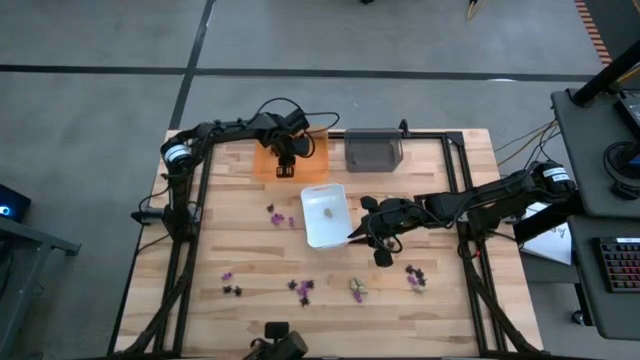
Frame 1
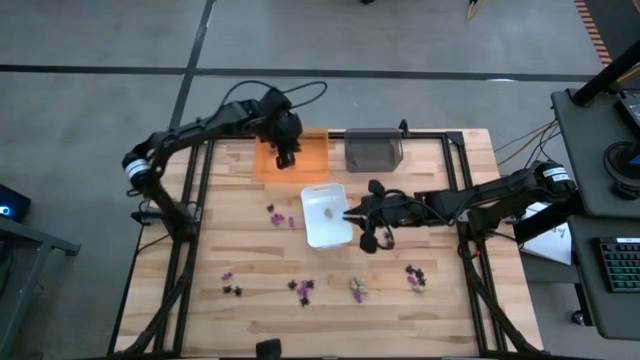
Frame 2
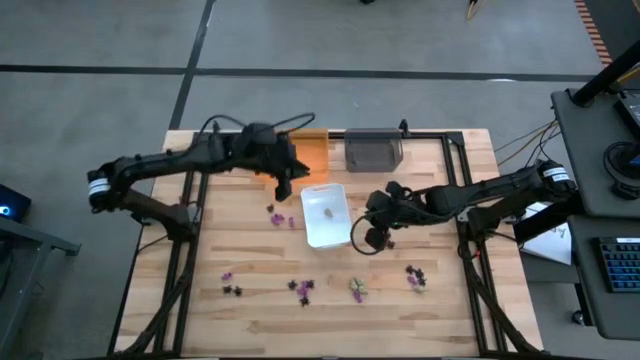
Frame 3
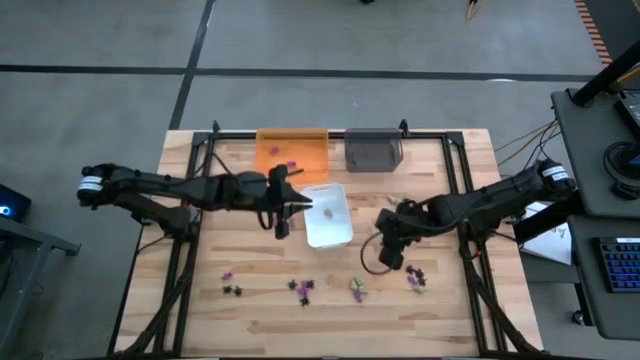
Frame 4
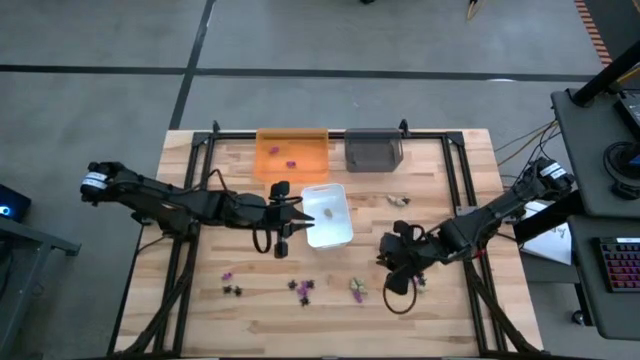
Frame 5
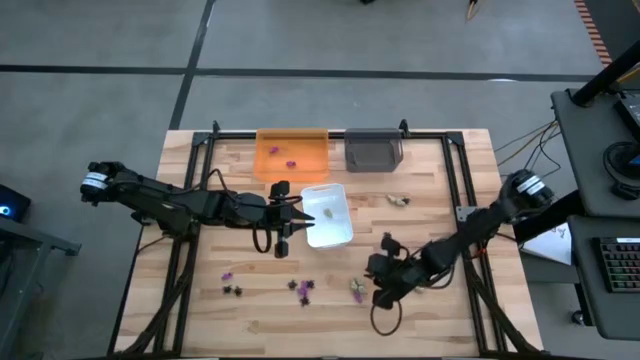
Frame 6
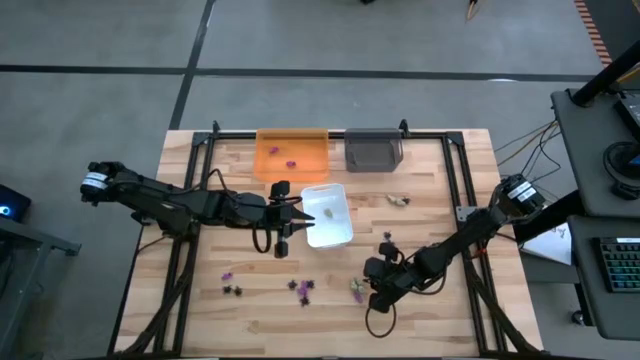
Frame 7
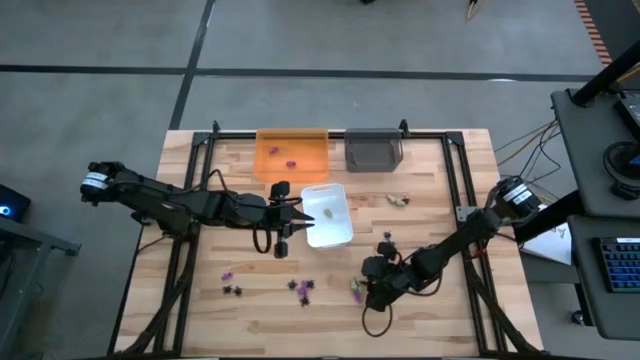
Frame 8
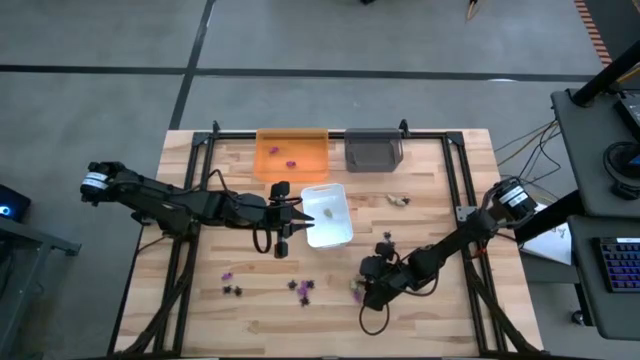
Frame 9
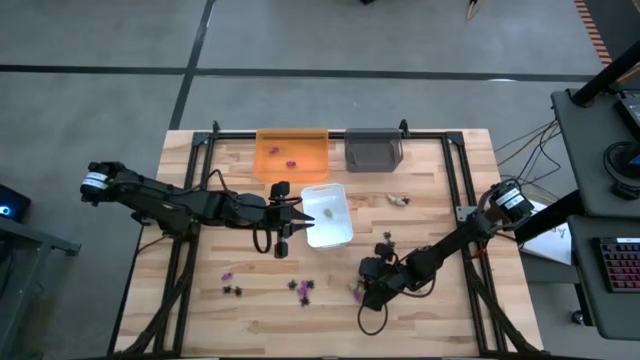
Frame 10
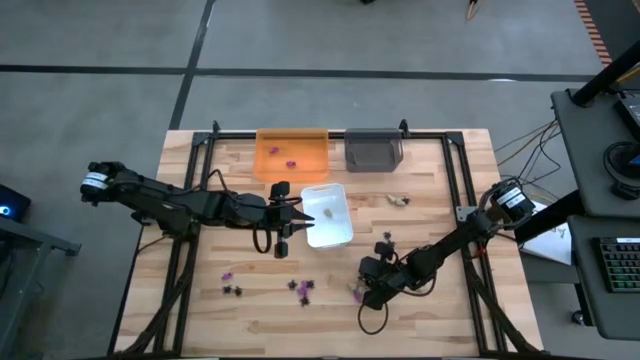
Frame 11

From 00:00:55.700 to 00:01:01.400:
Task: Sort Halloween decoration
Put the white skull toy into the white bin

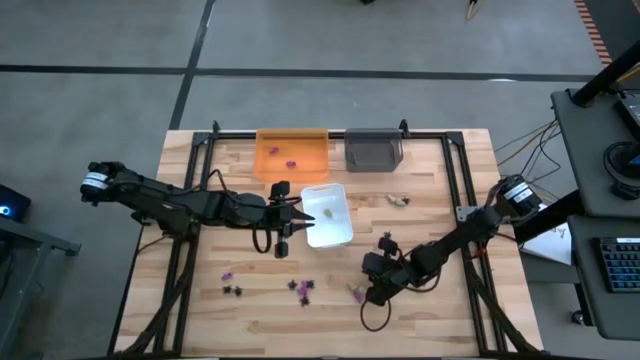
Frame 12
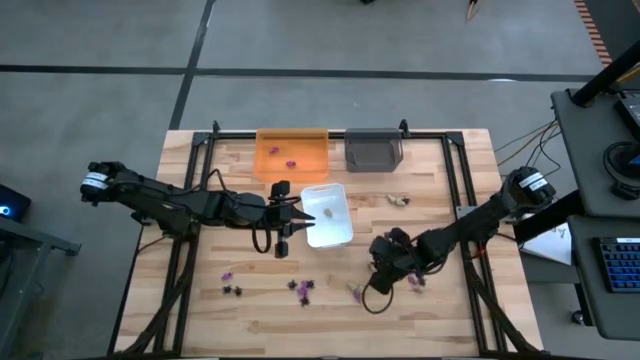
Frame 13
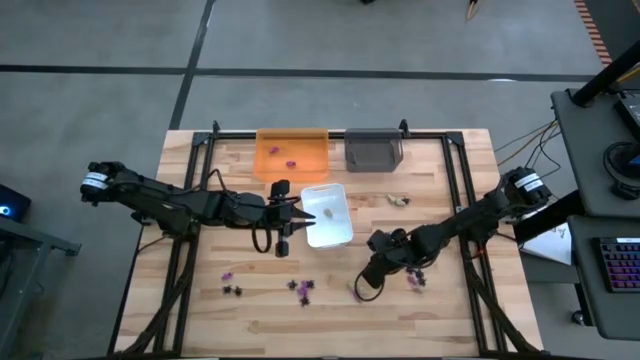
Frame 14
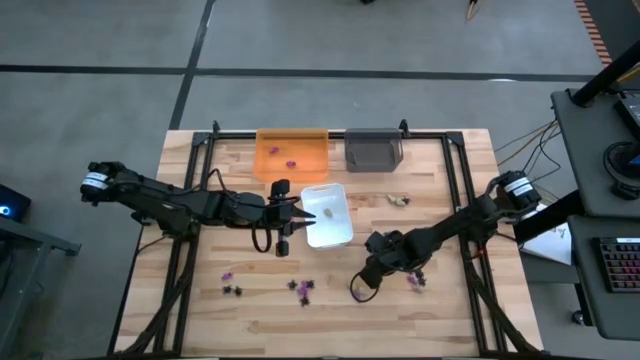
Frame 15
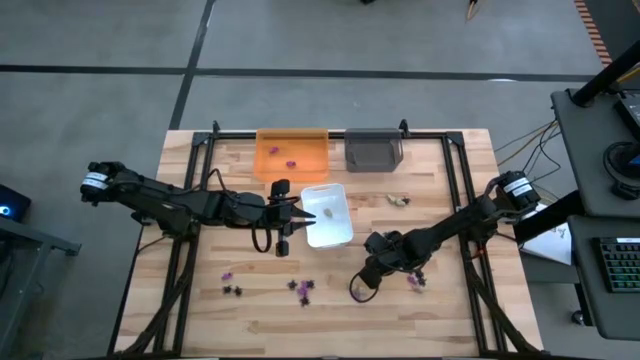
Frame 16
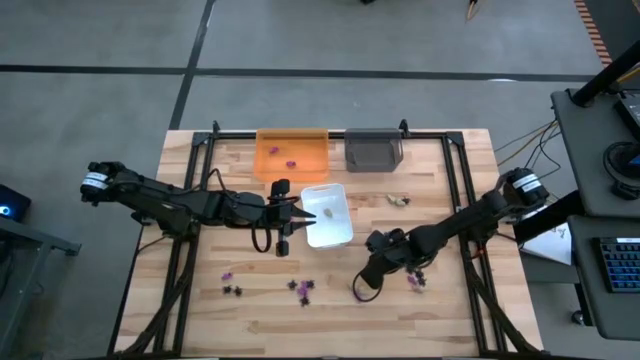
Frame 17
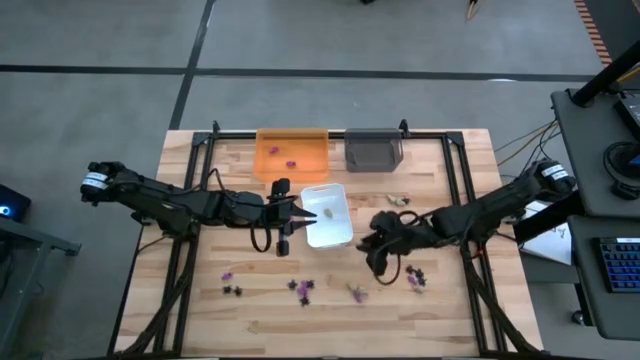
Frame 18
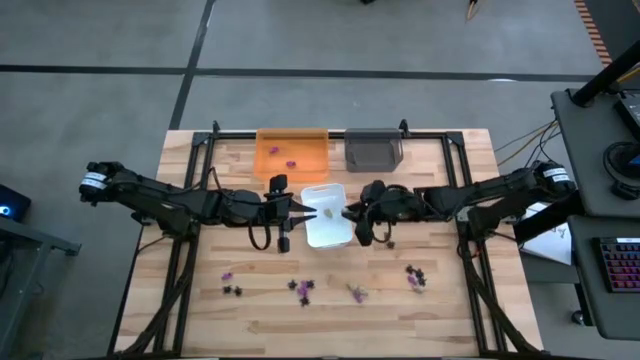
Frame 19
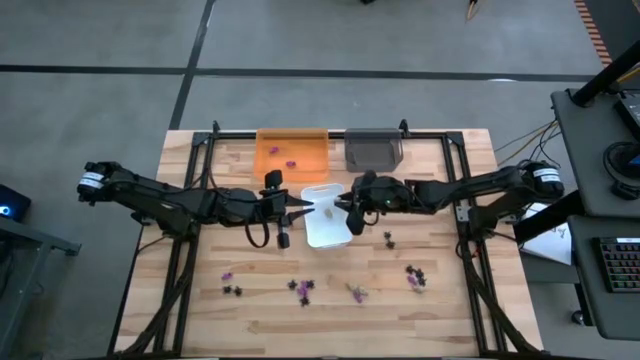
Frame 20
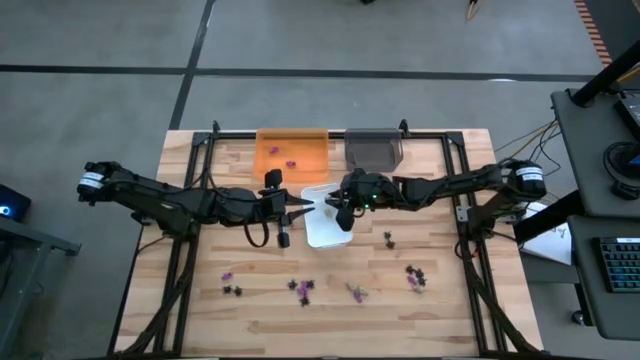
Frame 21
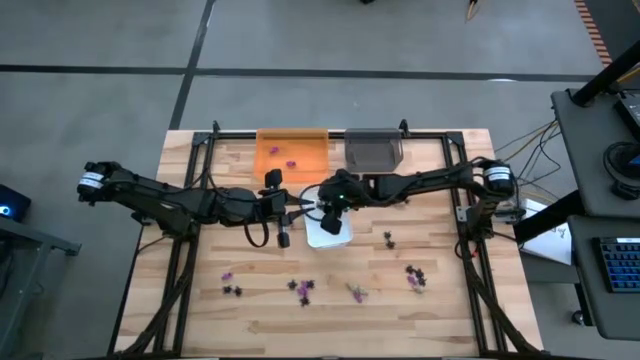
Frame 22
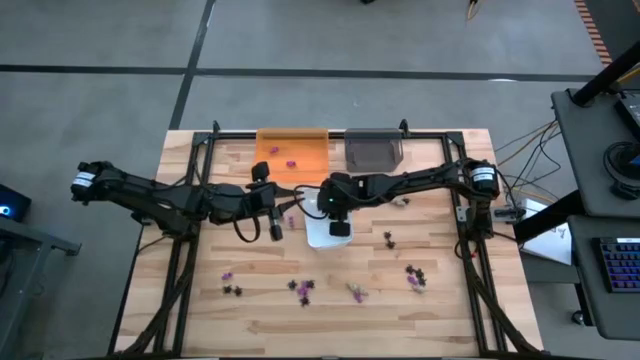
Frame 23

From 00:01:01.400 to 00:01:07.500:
Put the white skull toy into the white bin

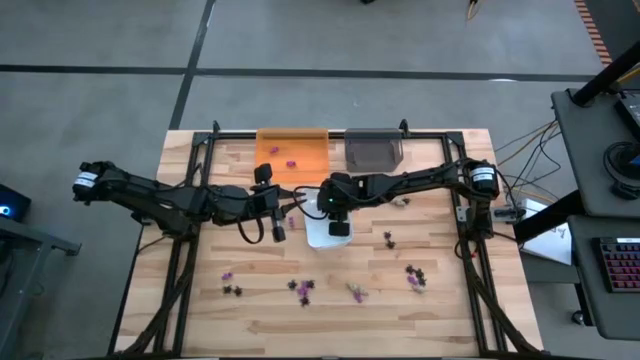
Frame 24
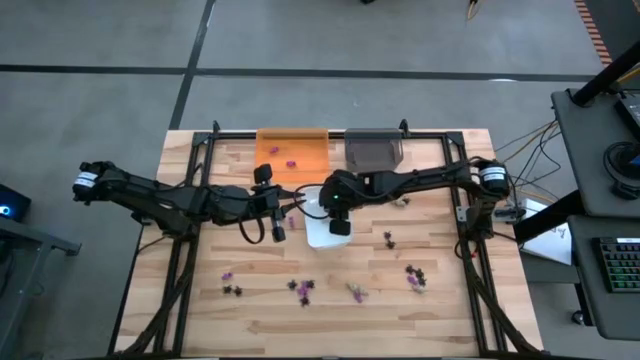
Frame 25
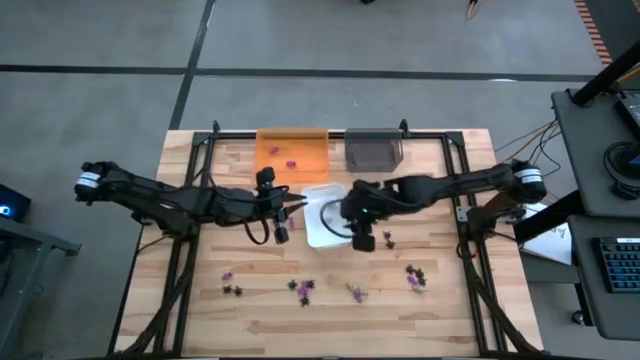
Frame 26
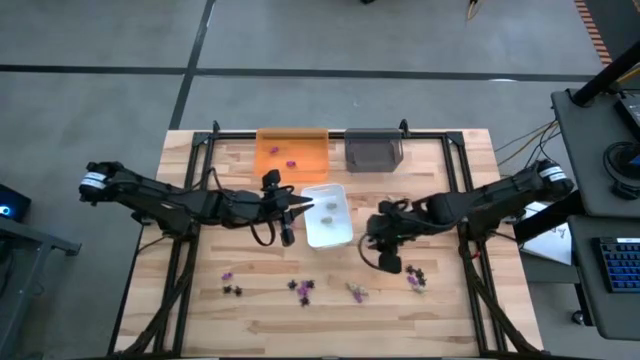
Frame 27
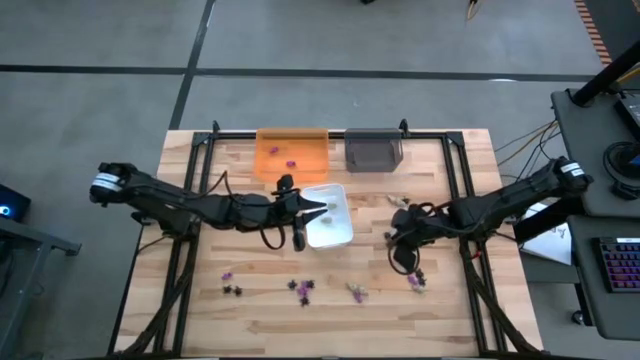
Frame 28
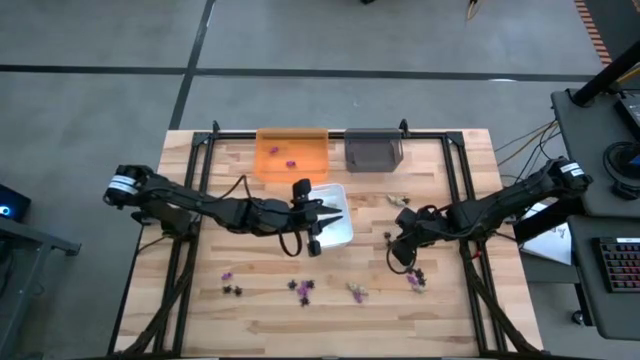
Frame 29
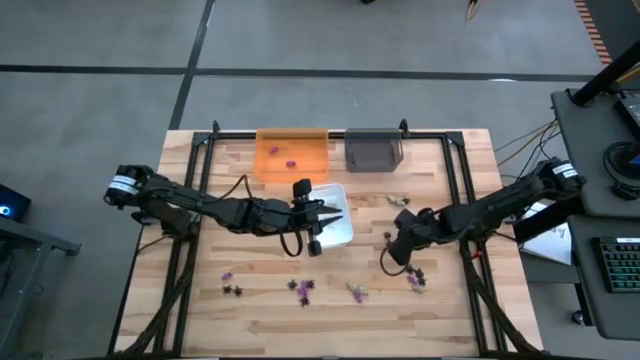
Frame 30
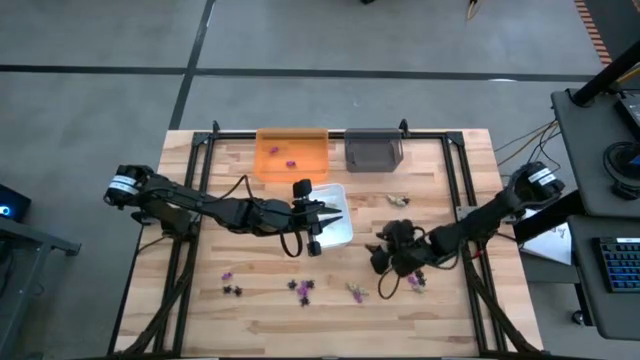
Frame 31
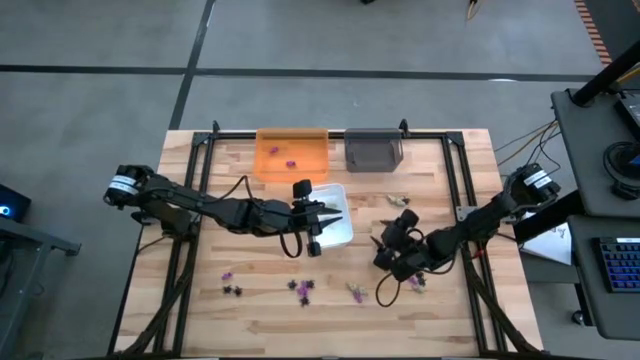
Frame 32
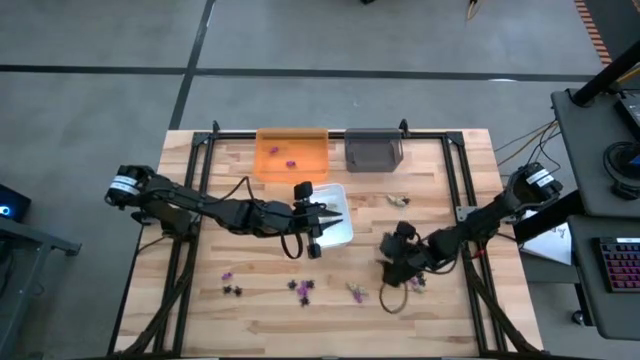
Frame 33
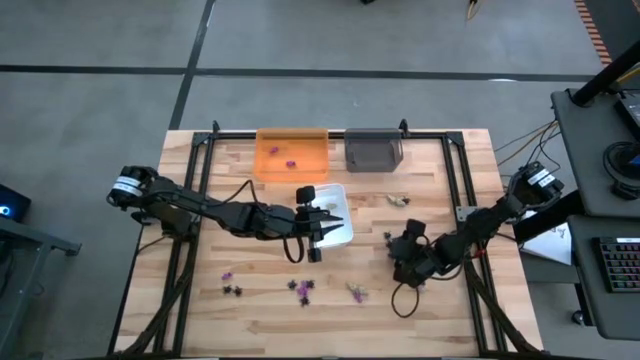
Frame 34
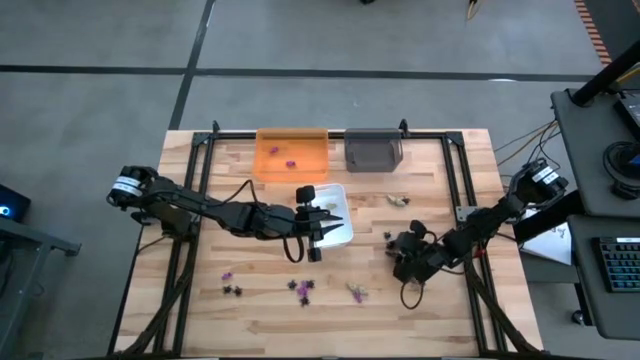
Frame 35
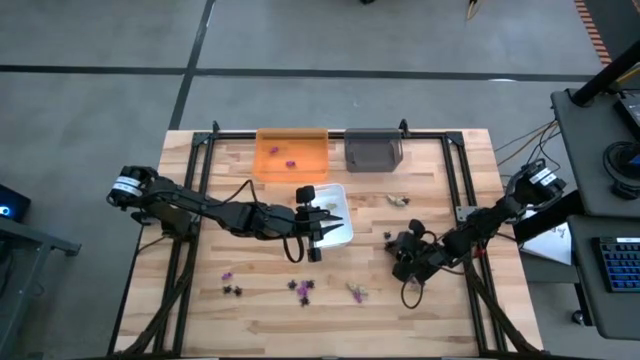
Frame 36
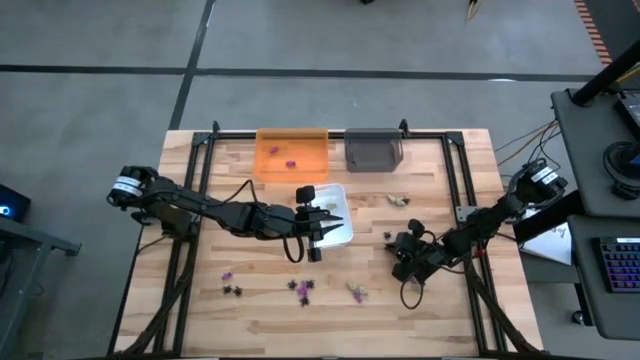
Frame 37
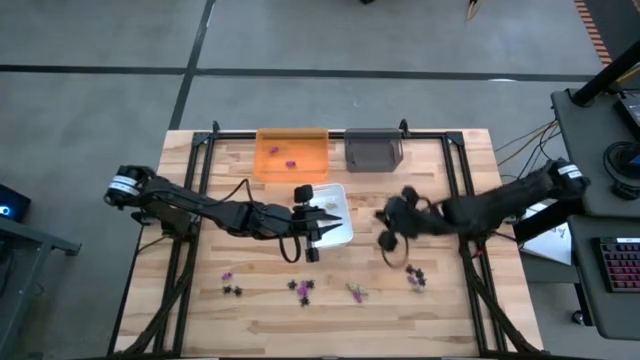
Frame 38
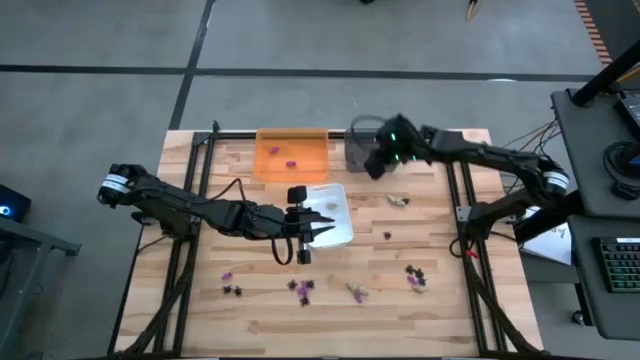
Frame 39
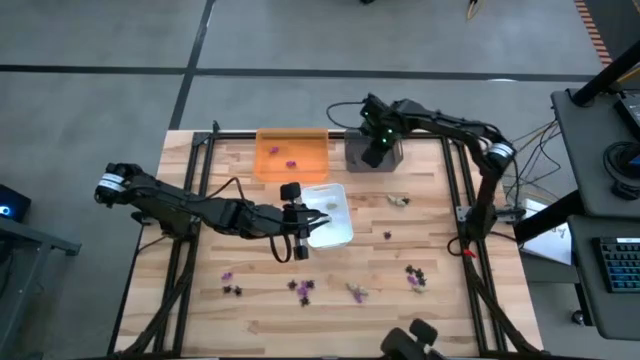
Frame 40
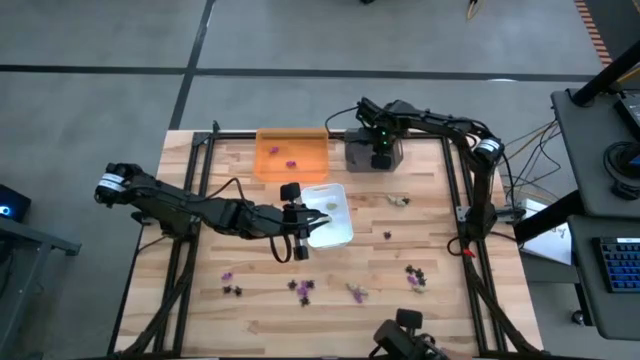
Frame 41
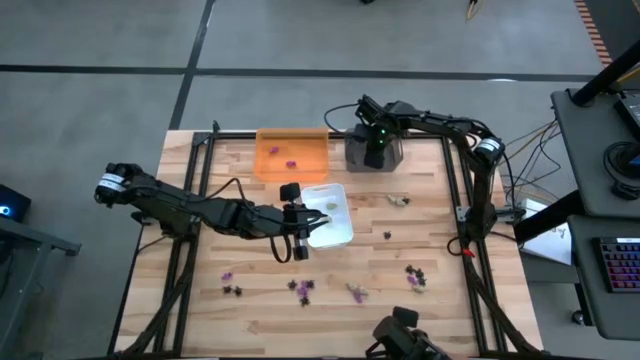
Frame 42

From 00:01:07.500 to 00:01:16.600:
Put the black spider toy into the black bin
